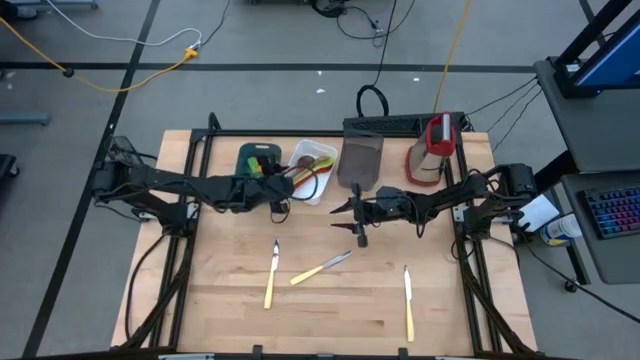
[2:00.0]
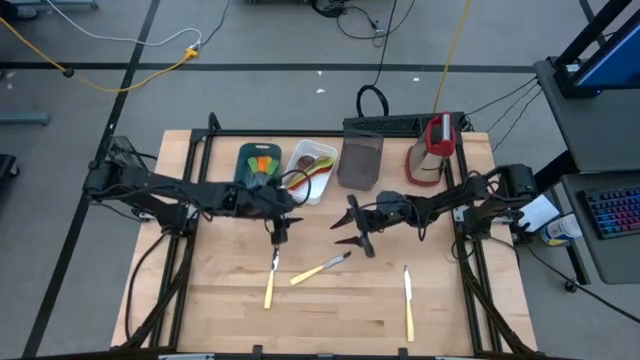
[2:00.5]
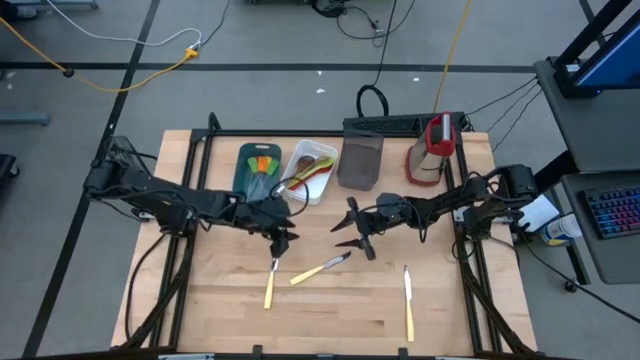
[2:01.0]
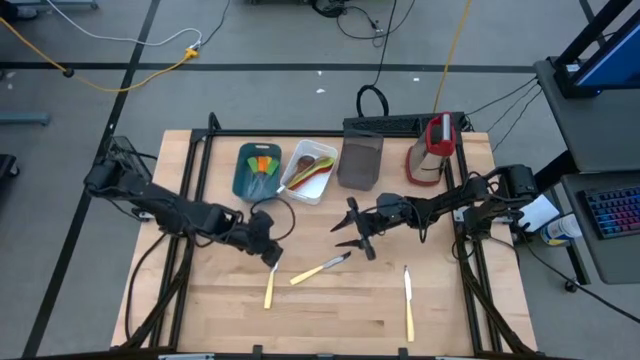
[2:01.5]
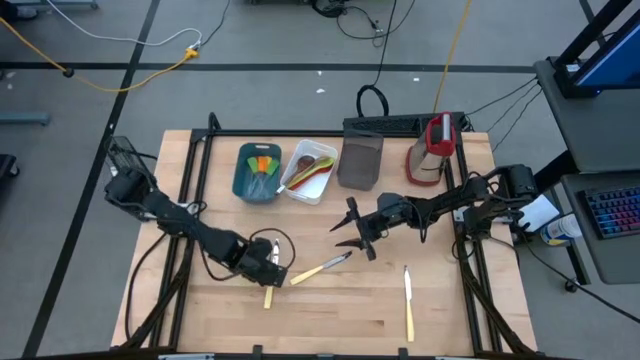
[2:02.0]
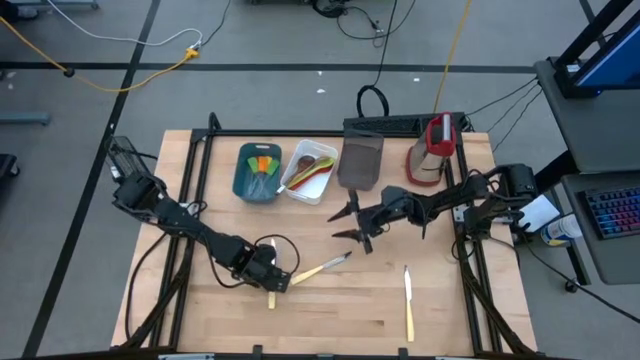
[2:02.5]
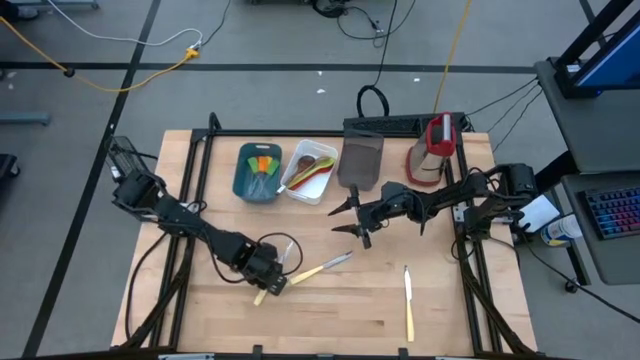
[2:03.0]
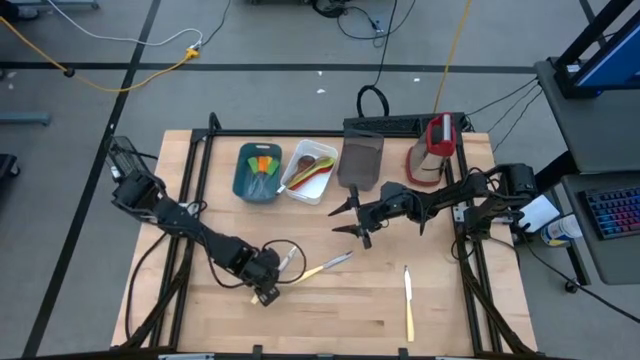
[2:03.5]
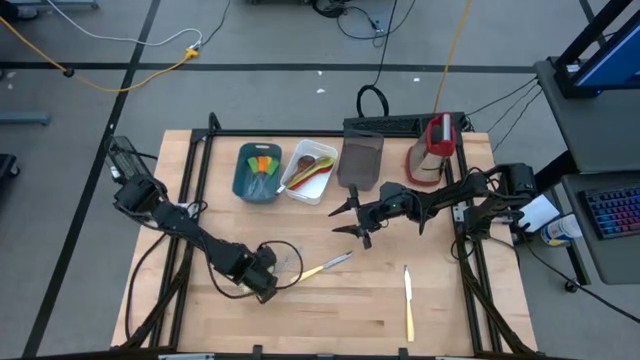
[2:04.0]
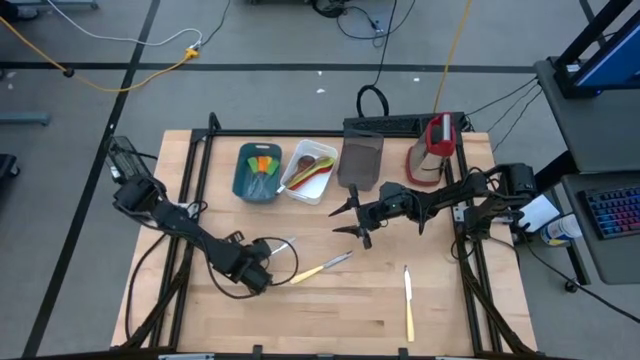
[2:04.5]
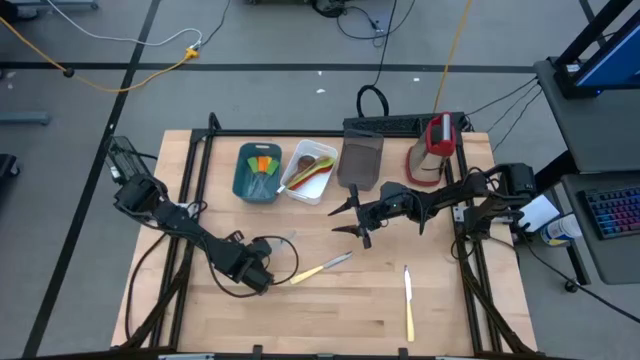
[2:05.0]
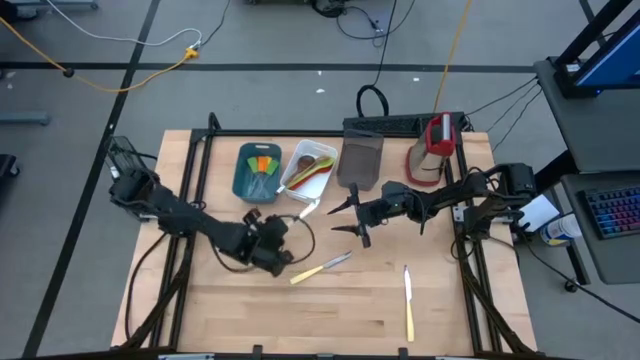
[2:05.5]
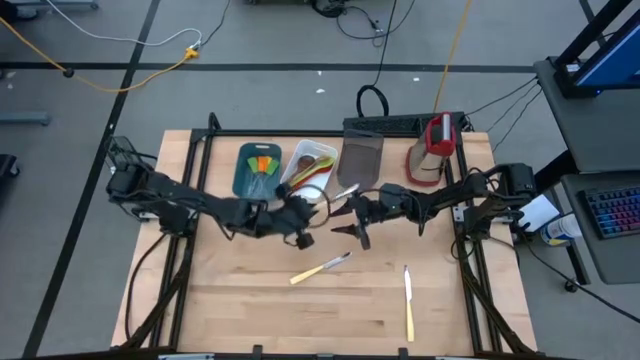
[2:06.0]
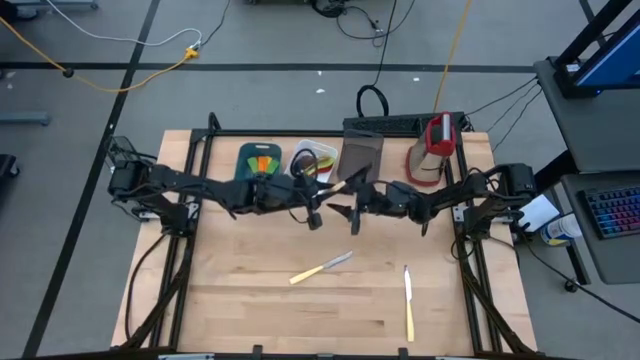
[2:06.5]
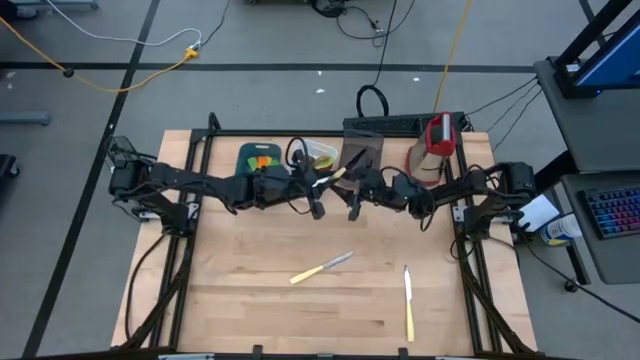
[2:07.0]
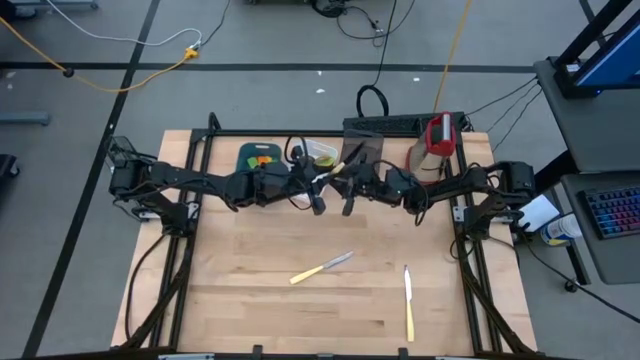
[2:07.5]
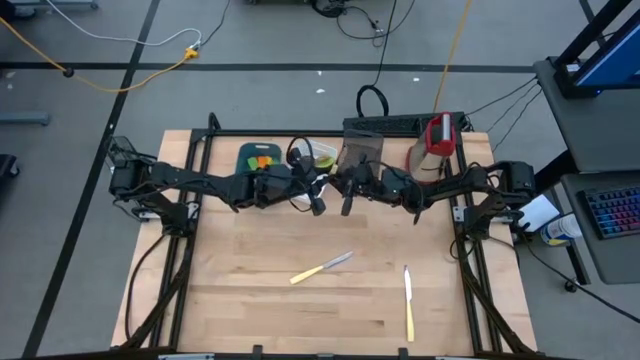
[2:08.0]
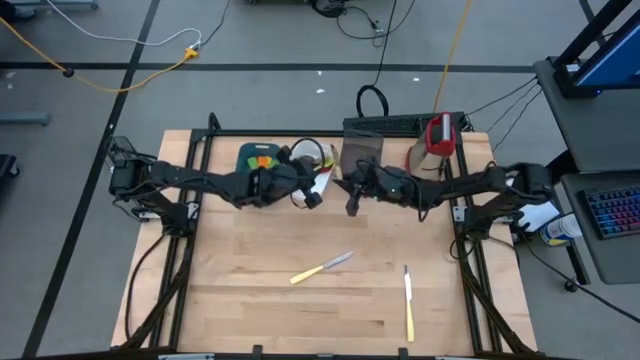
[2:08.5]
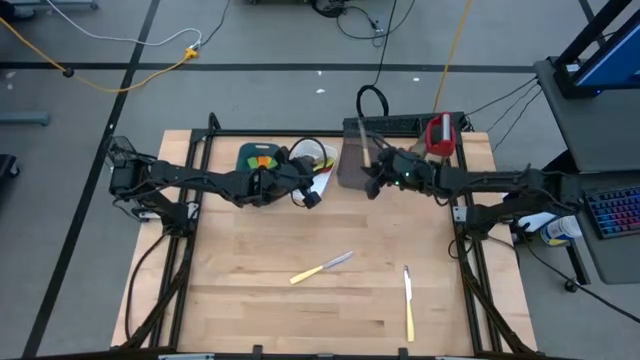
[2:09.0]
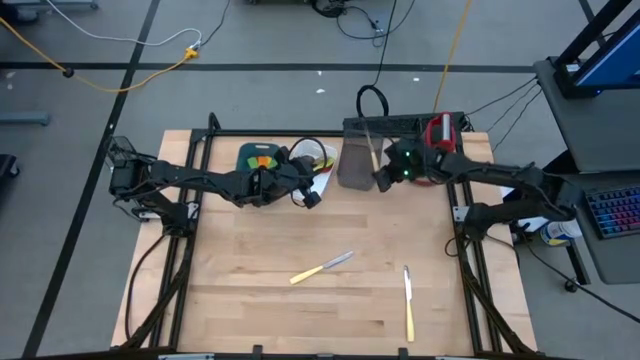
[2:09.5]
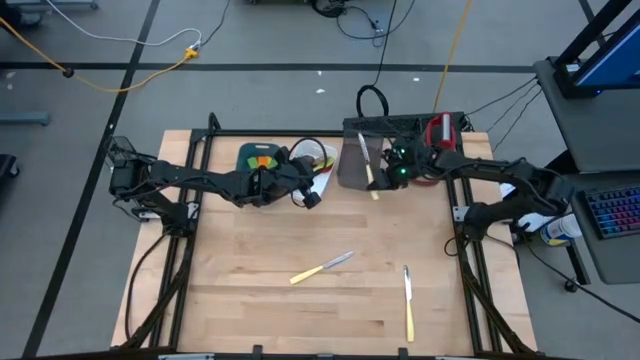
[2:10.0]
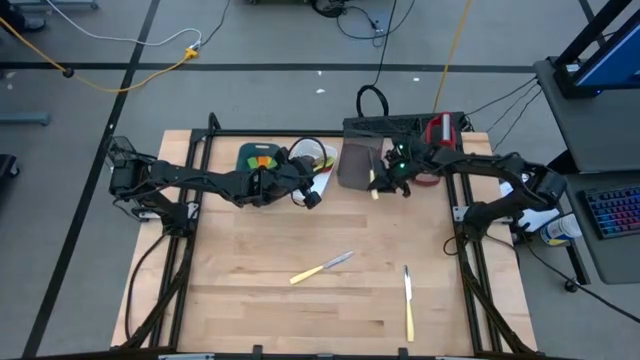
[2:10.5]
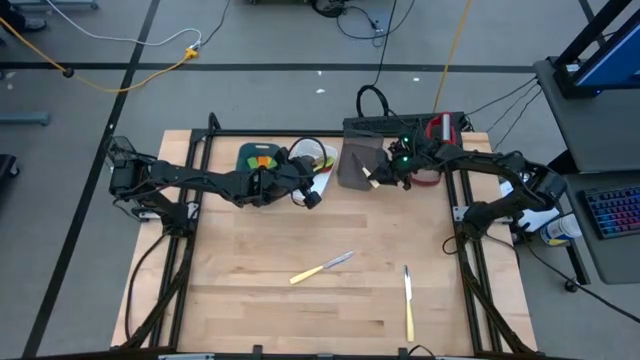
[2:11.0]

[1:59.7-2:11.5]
Task: Pick & Place Kitchen Items
Put the left yellow table knife into the black bin

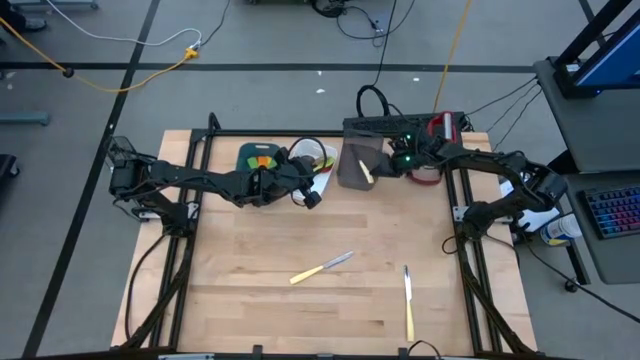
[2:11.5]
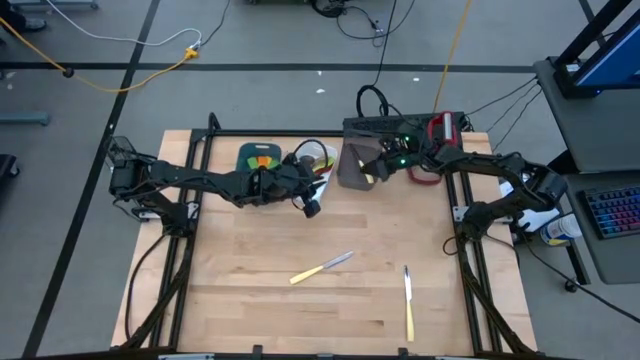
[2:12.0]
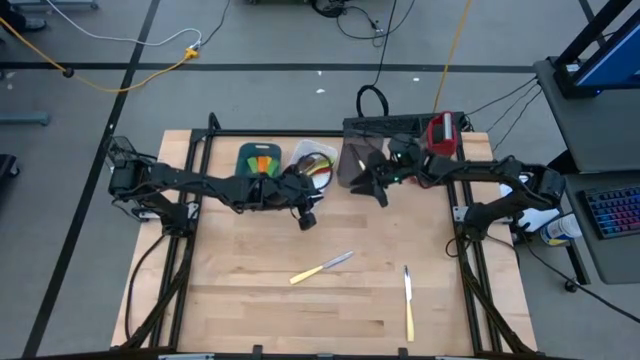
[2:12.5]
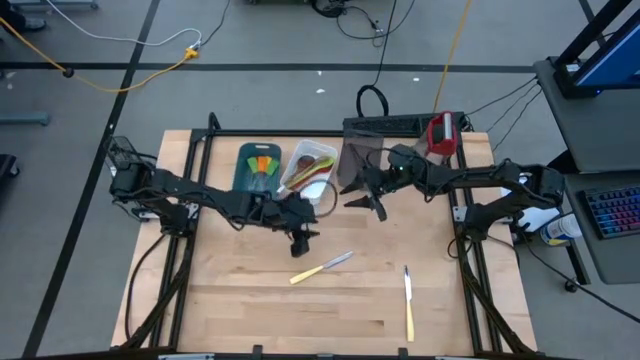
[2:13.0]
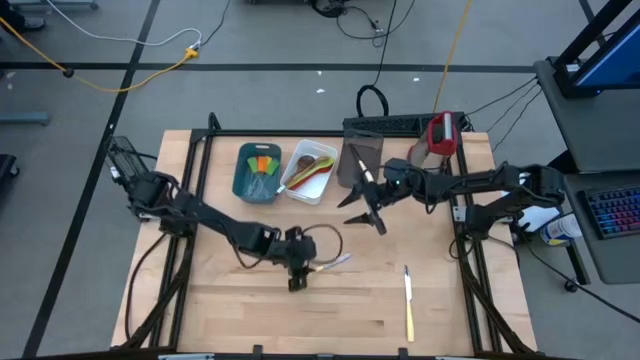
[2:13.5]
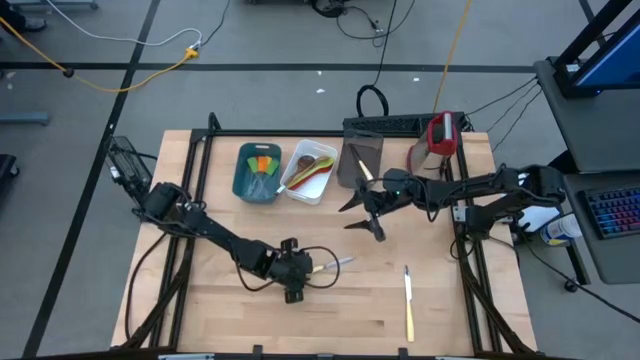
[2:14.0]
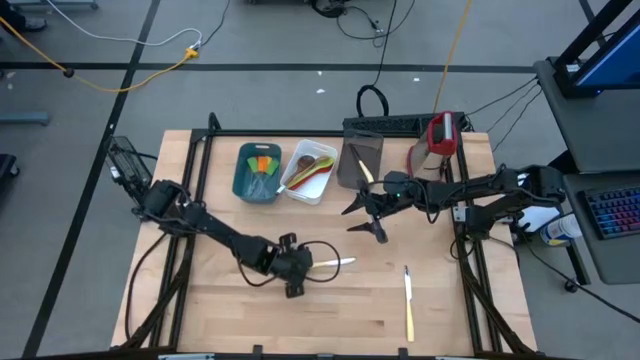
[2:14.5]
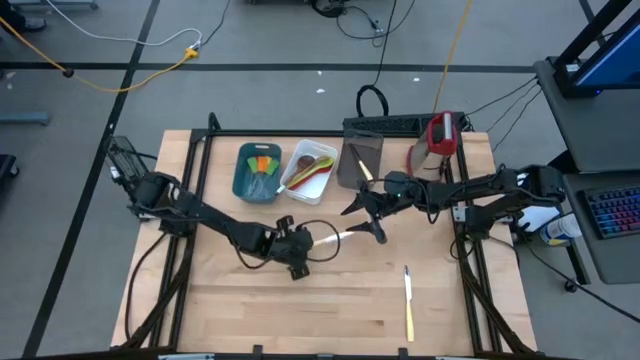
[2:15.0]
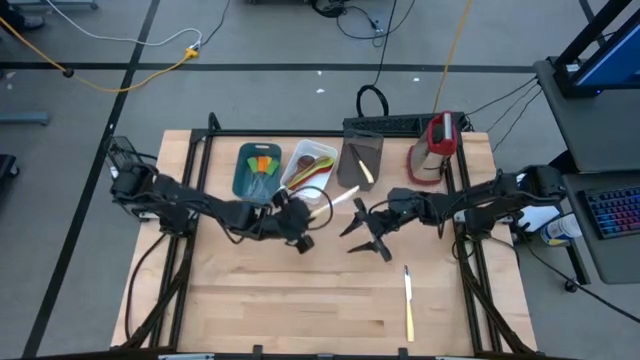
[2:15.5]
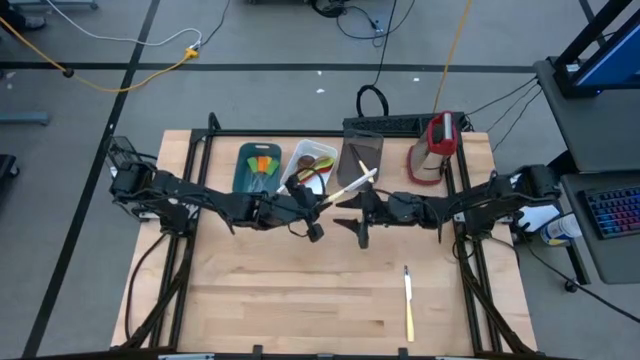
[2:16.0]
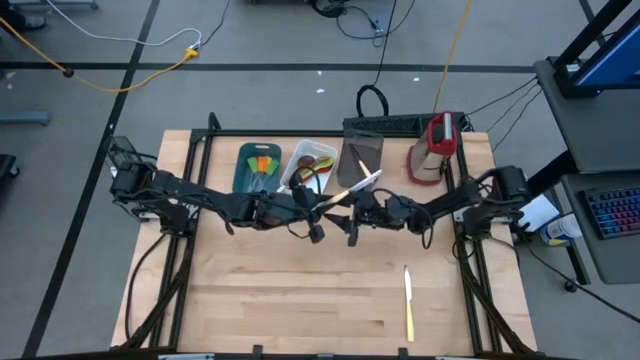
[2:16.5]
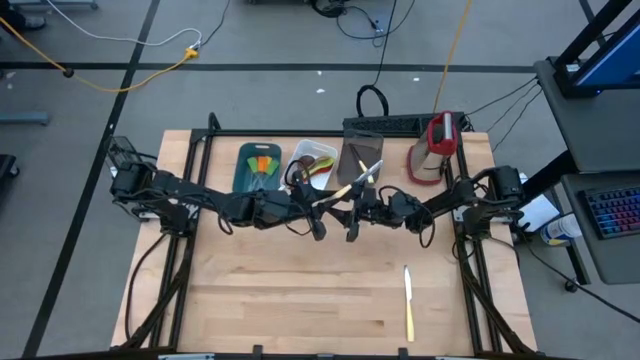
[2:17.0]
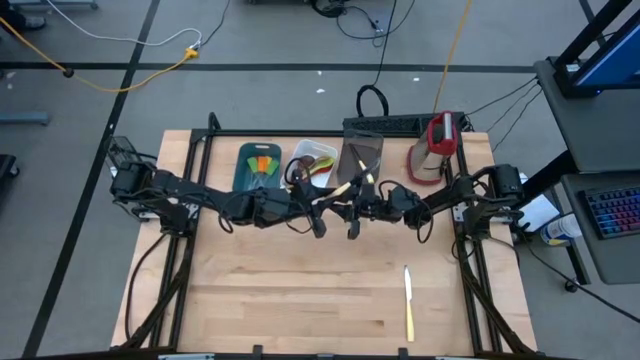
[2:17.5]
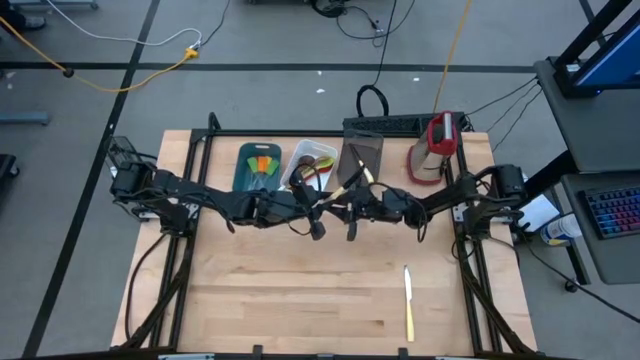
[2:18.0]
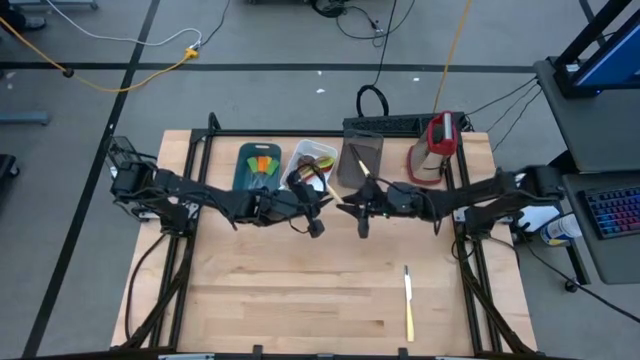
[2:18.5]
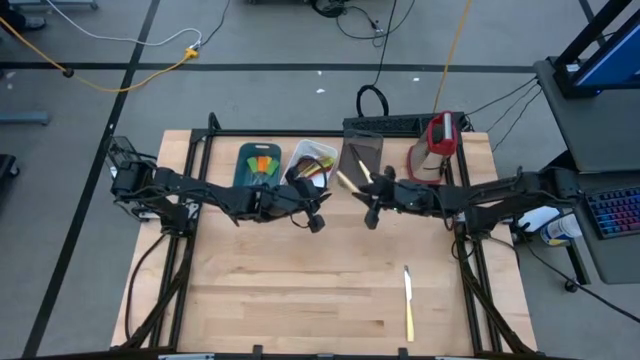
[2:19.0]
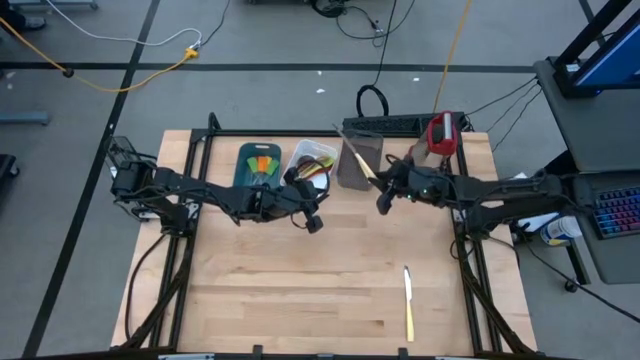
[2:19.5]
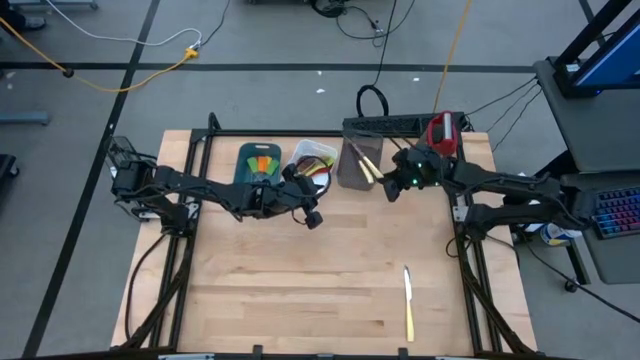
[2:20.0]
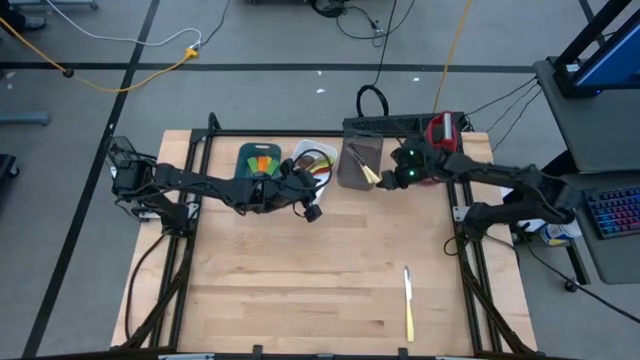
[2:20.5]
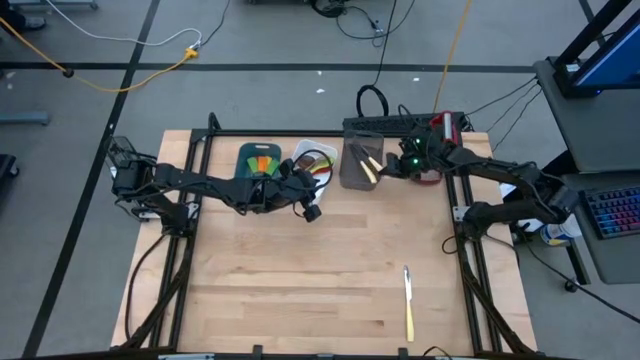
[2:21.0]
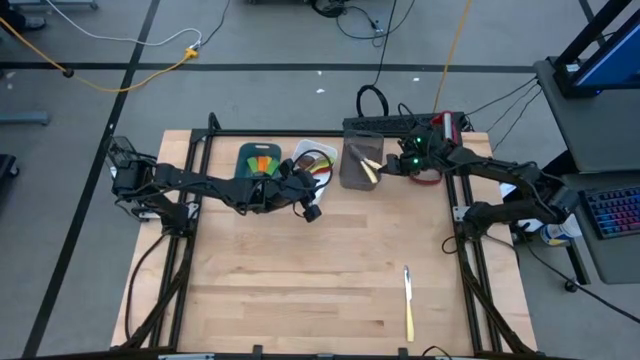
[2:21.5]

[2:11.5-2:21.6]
Put the left yellow table knife into the black bin
